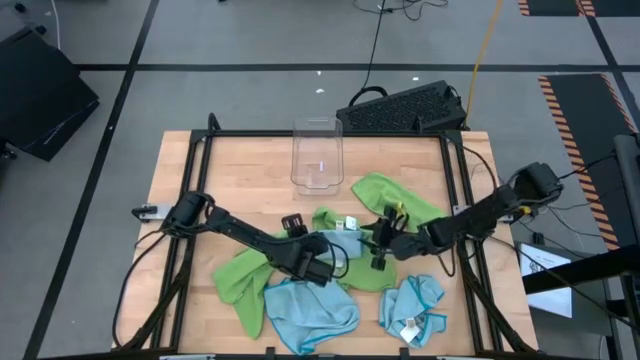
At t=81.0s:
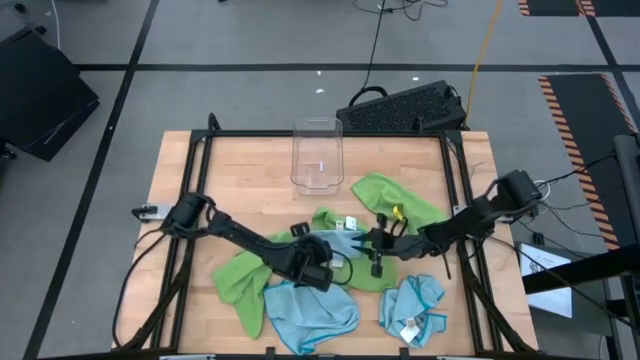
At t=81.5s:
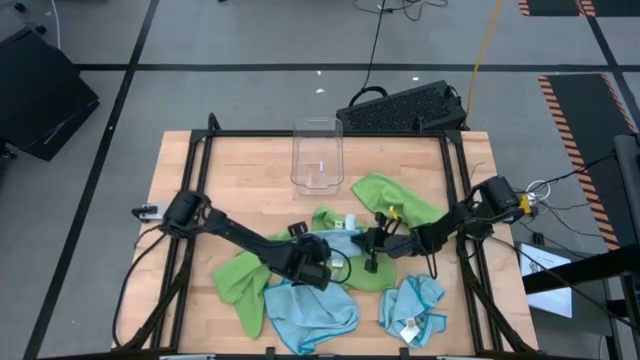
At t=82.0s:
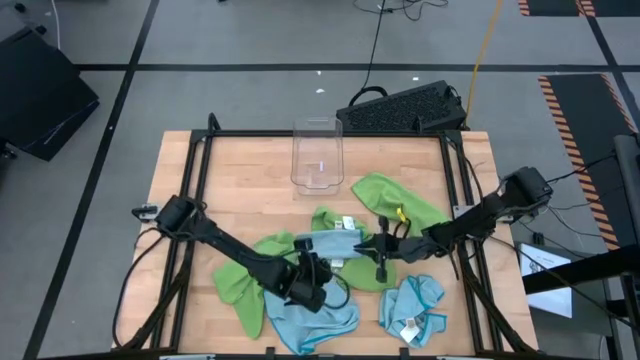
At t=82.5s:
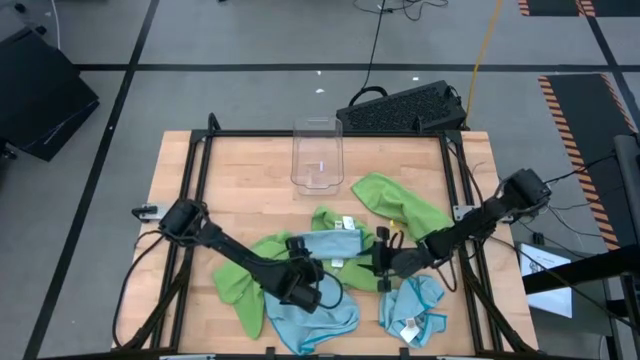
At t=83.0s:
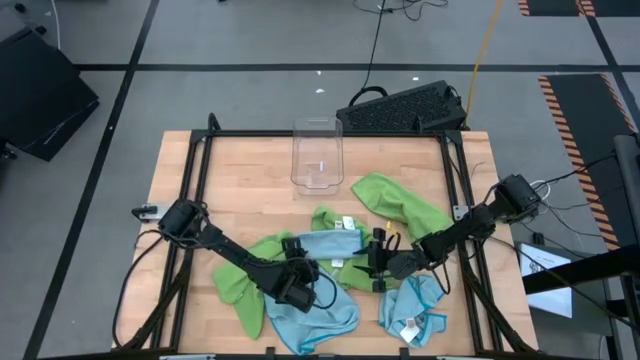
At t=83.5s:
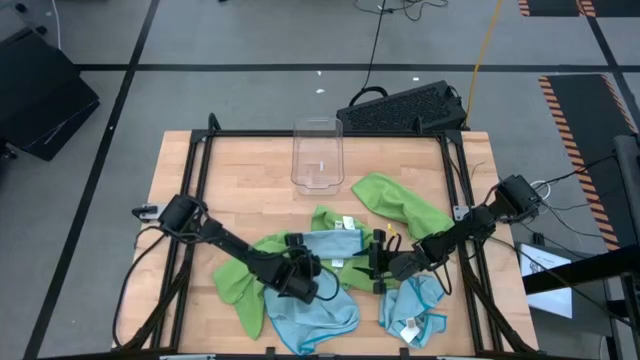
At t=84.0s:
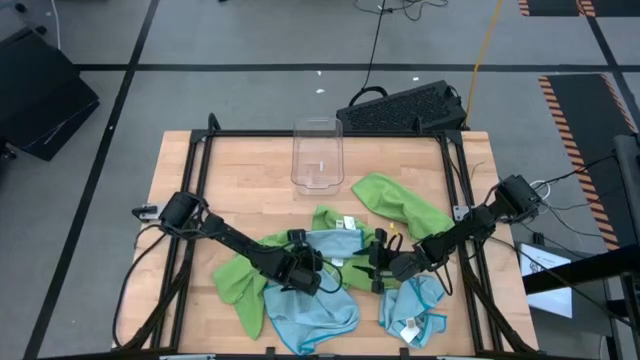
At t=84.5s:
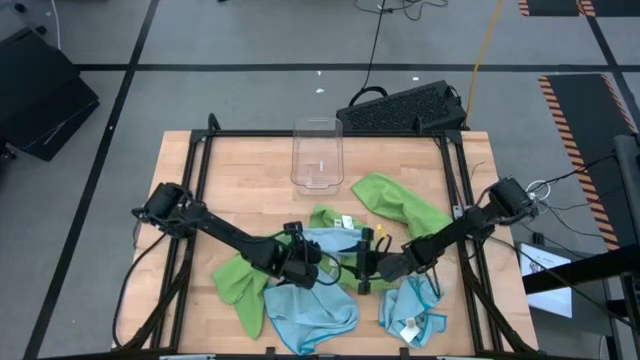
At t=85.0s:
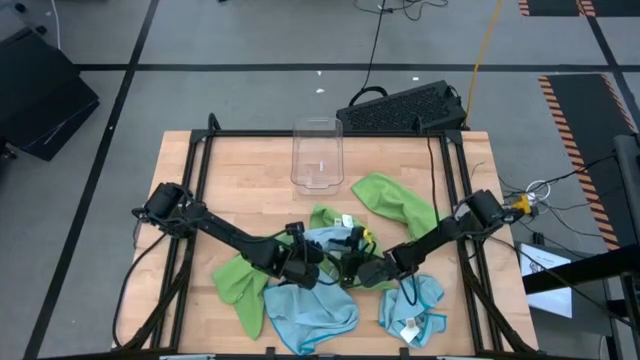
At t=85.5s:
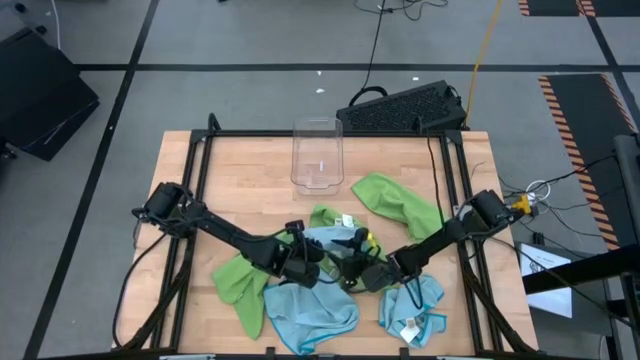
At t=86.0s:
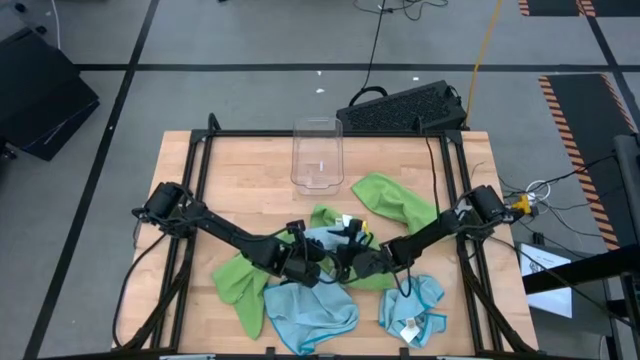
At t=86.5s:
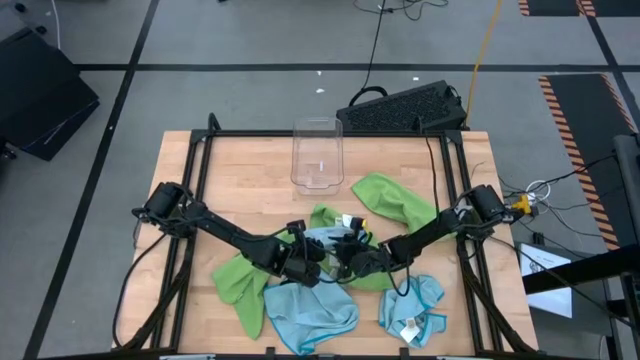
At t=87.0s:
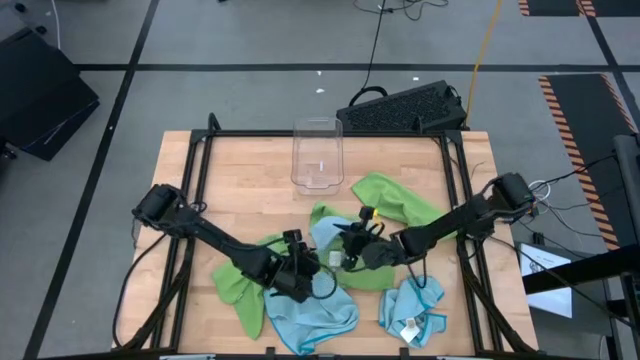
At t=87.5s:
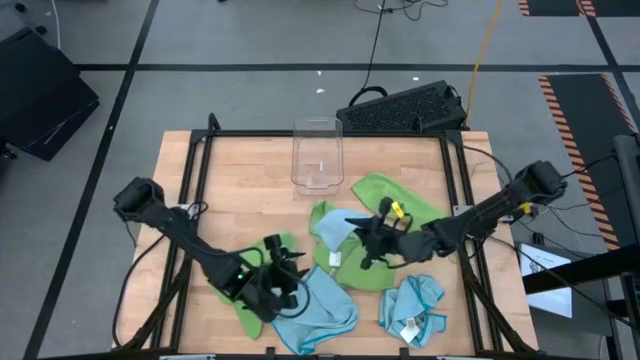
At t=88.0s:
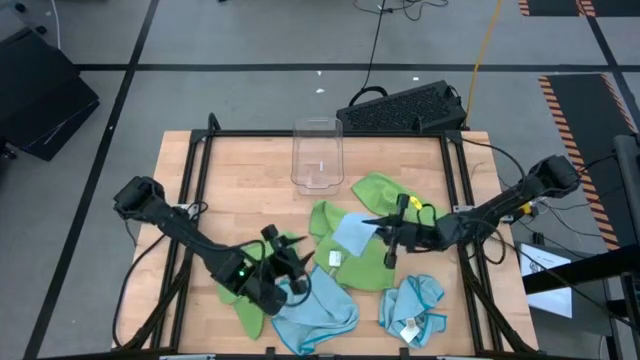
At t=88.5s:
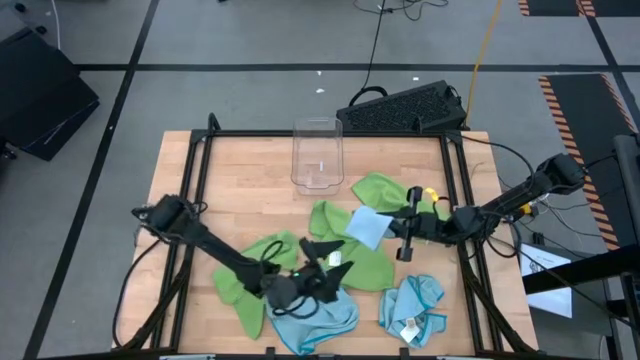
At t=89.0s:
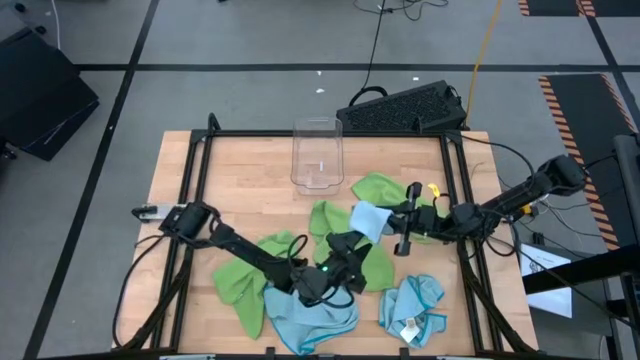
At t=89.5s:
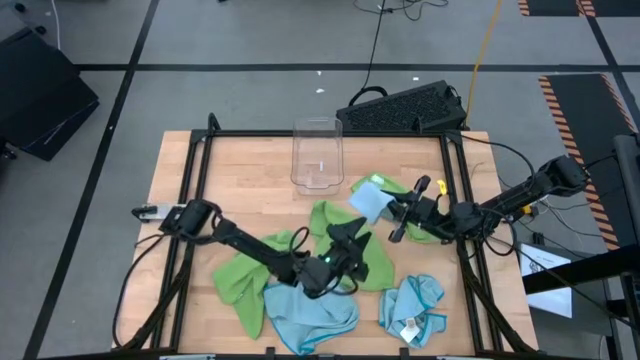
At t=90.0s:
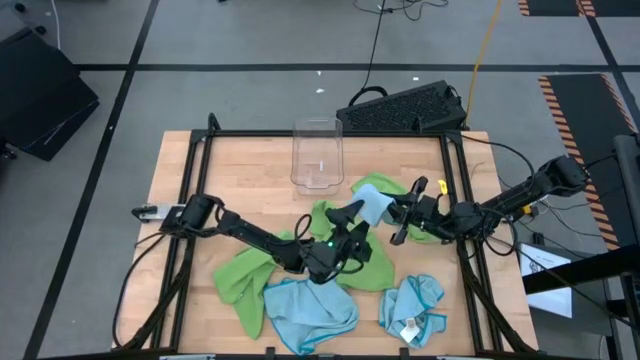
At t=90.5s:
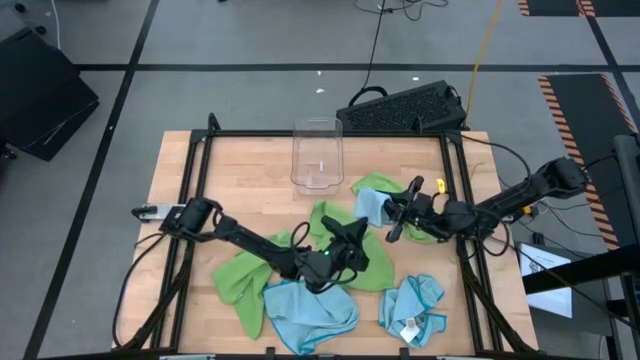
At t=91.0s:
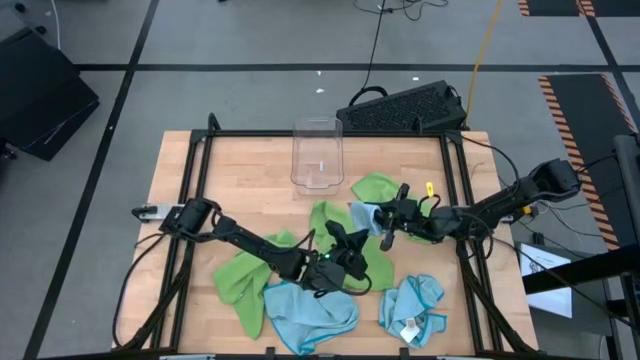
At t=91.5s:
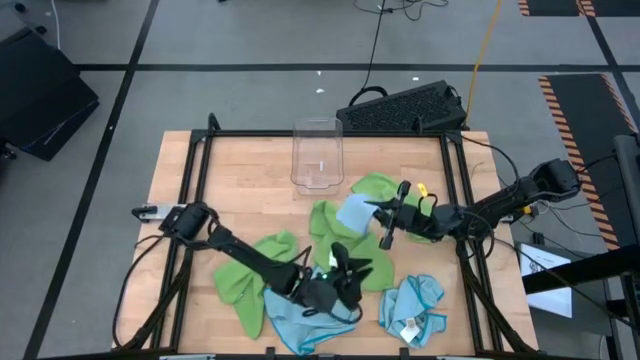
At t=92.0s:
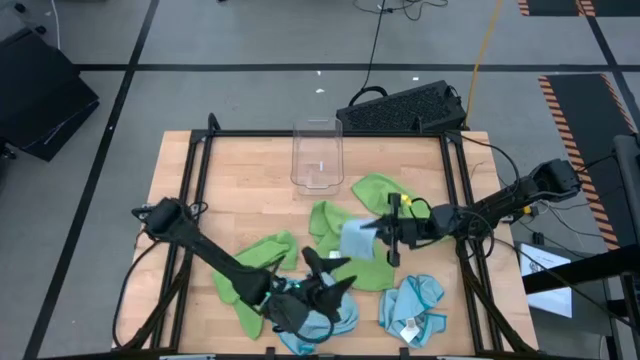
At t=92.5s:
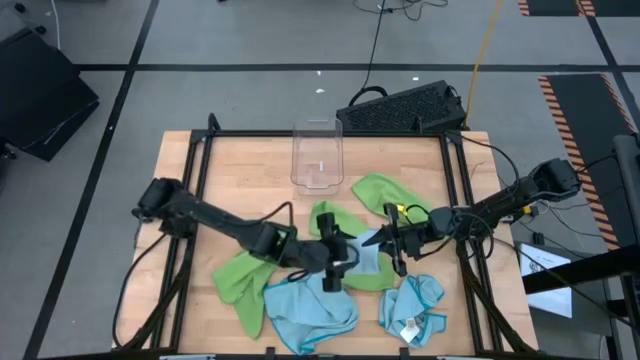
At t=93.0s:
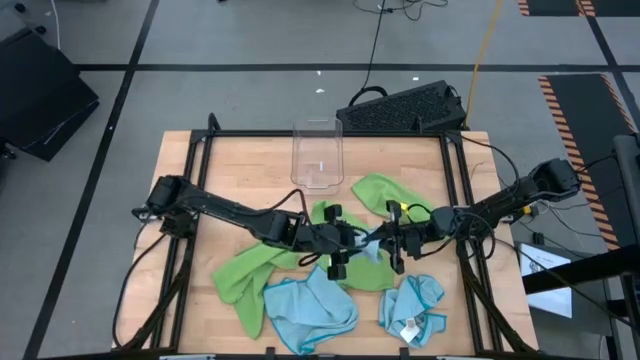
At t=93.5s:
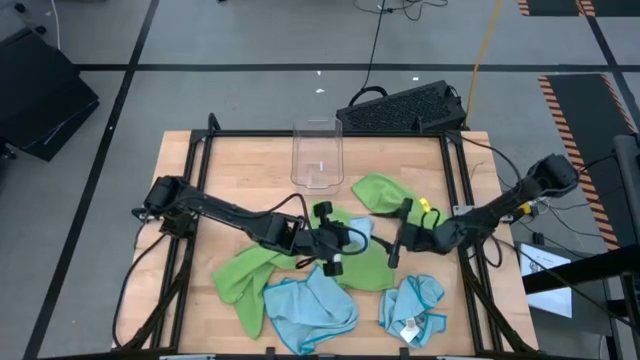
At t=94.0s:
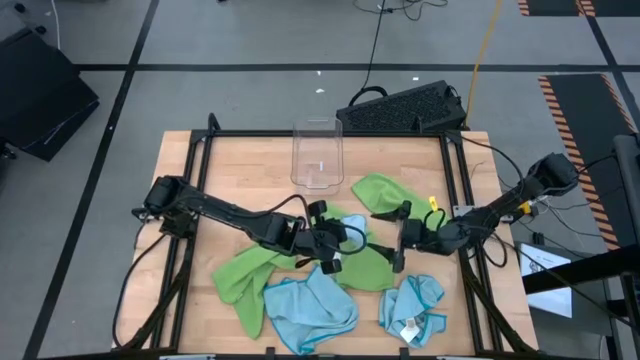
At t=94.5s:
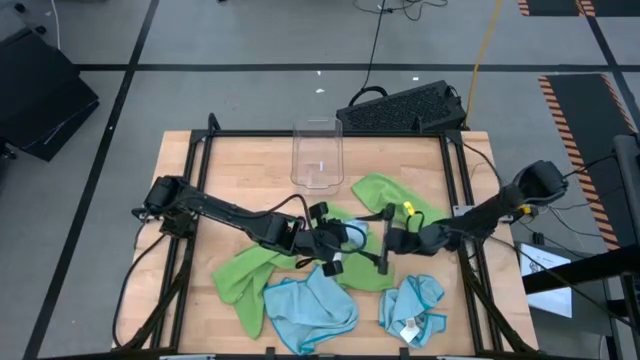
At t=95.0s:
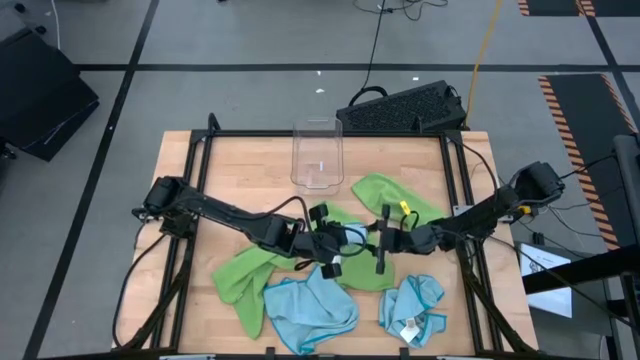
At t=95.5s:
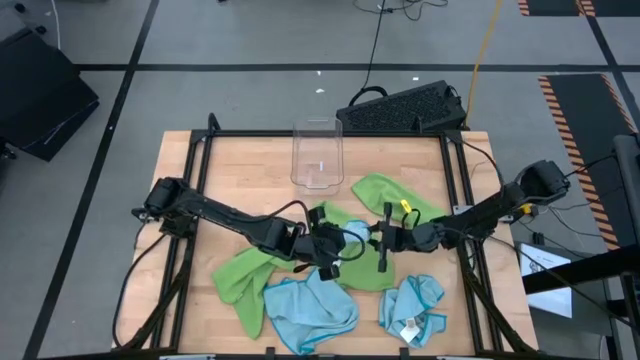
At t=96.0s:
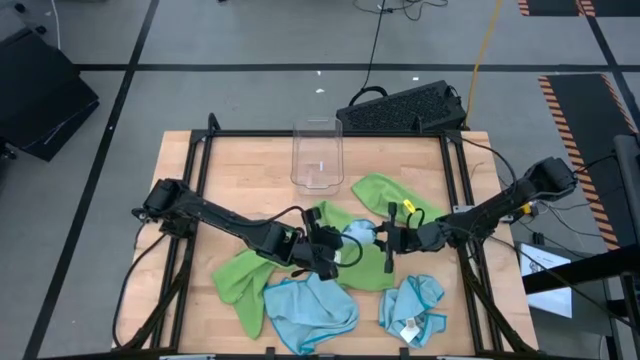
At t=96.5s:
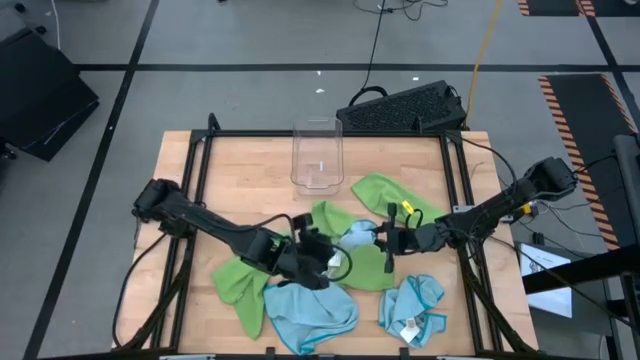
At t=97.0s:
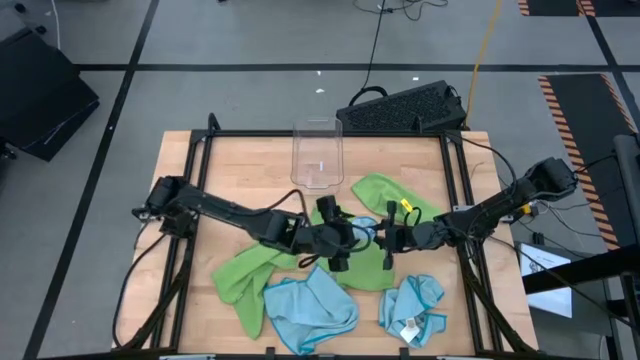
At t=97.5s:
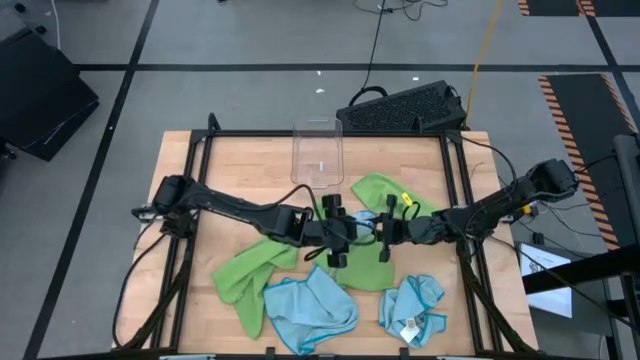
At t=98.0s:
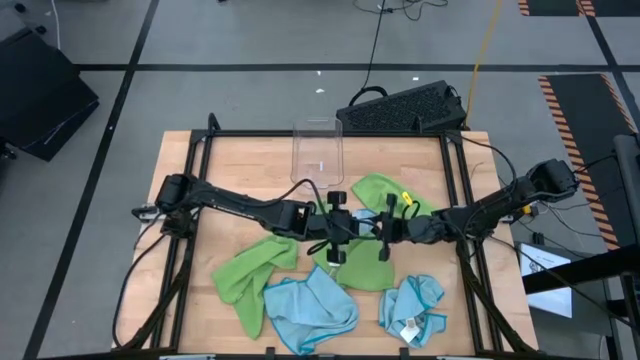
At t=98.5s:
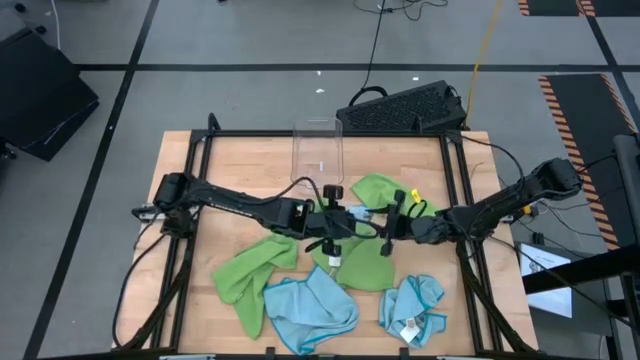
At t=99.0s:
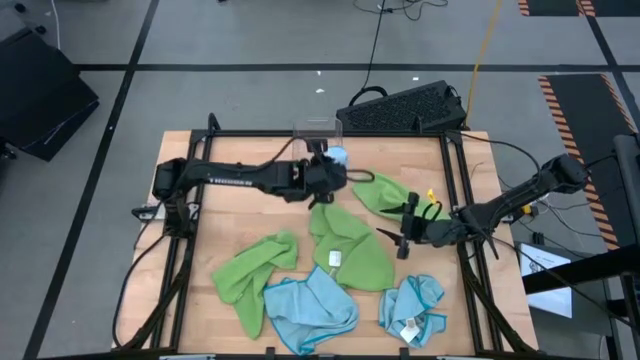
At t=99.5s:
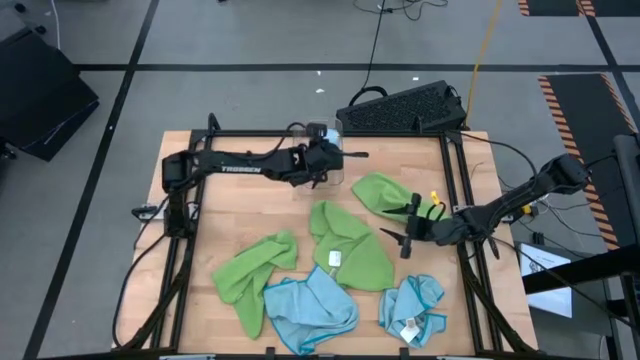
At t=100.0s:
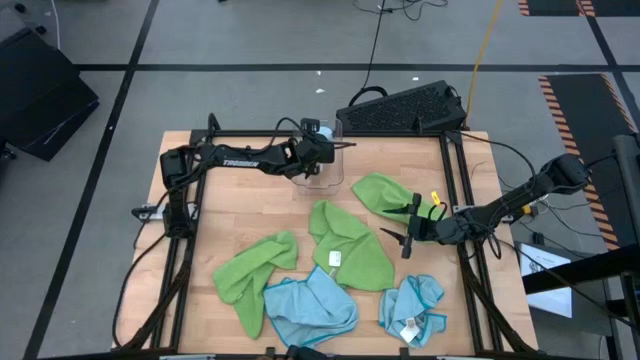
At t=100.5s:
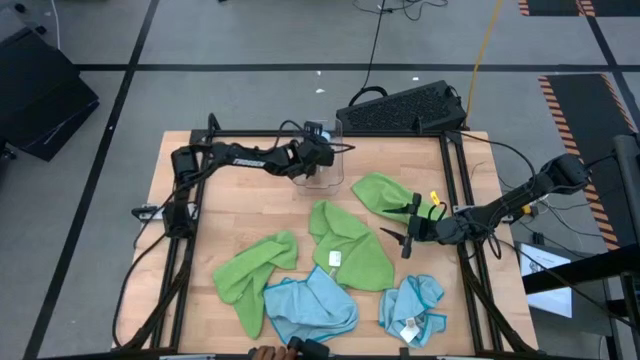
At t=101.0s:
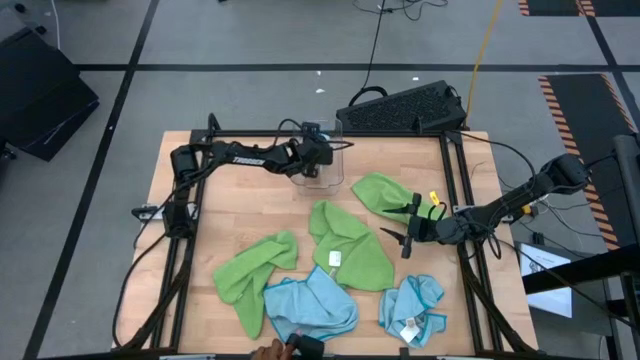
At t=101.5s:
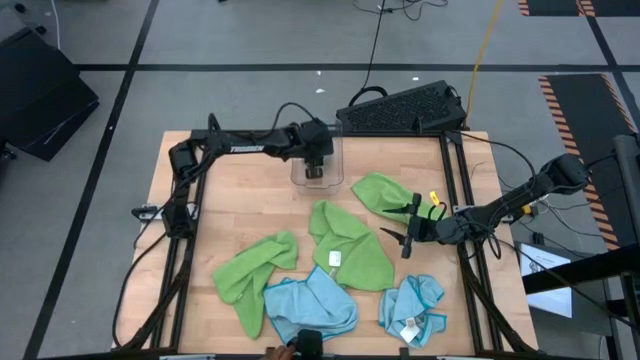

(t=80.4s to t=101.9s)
Task: Fold microfiber towels
Put the top left blue towel into the transparent bin
